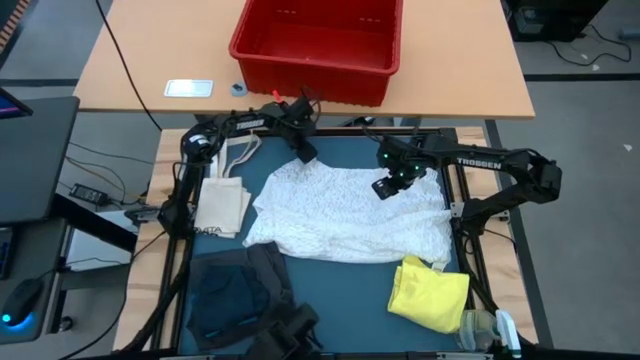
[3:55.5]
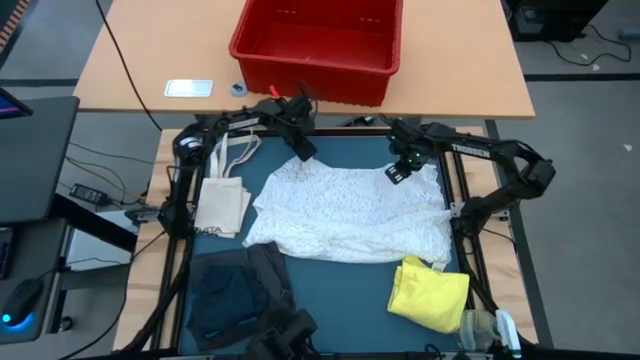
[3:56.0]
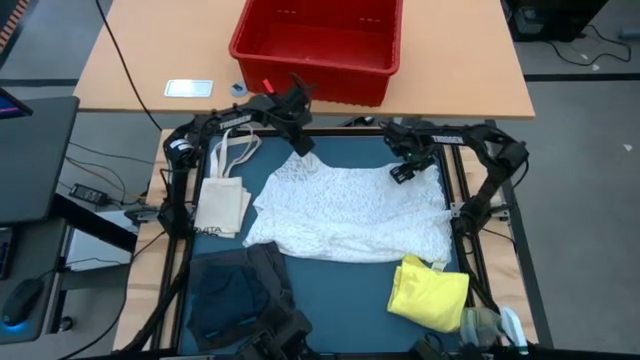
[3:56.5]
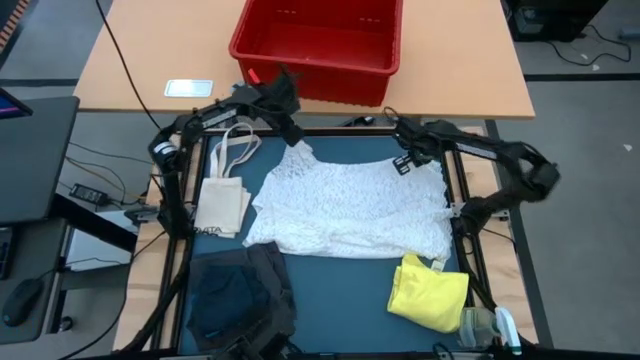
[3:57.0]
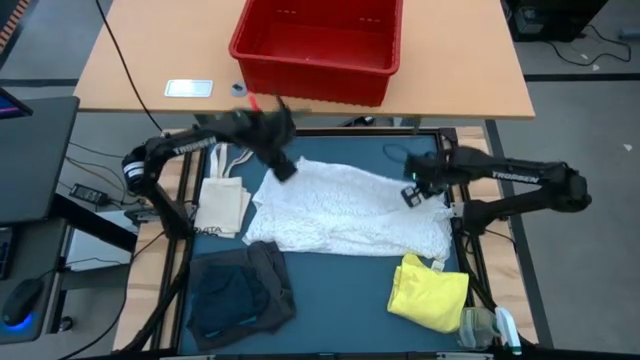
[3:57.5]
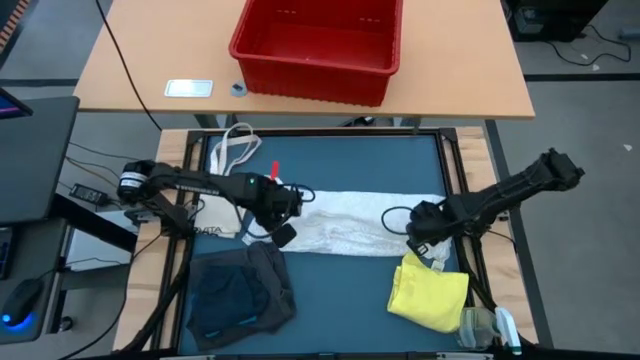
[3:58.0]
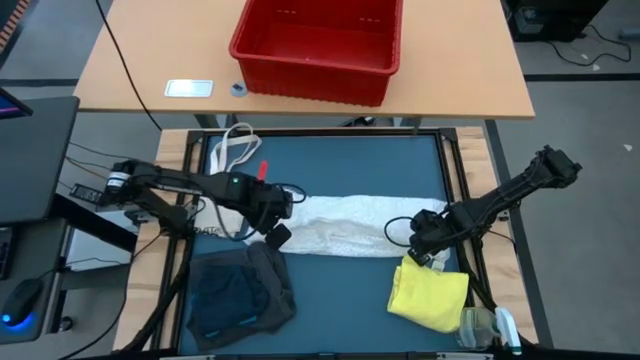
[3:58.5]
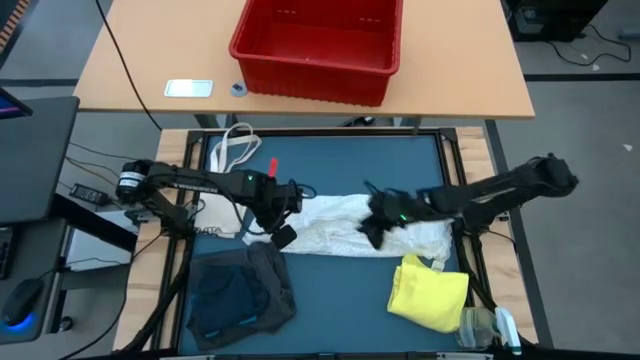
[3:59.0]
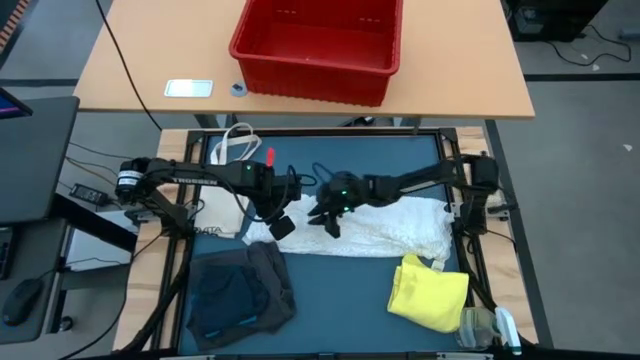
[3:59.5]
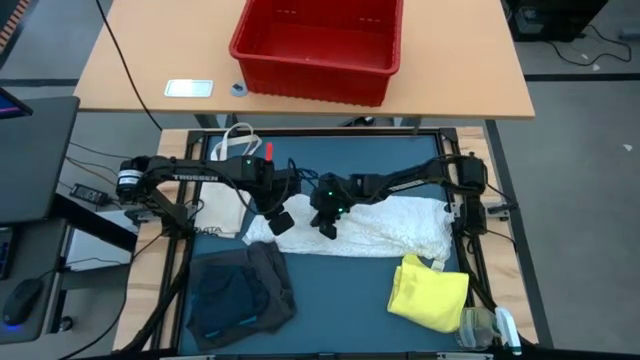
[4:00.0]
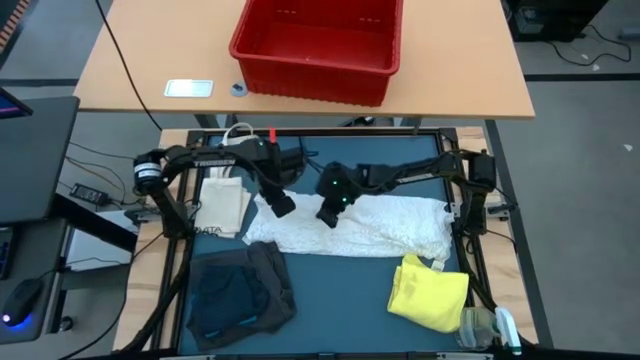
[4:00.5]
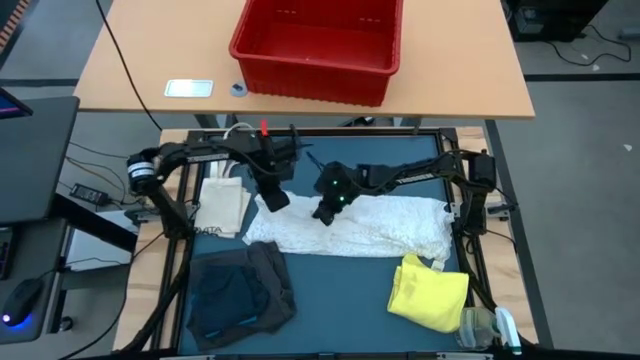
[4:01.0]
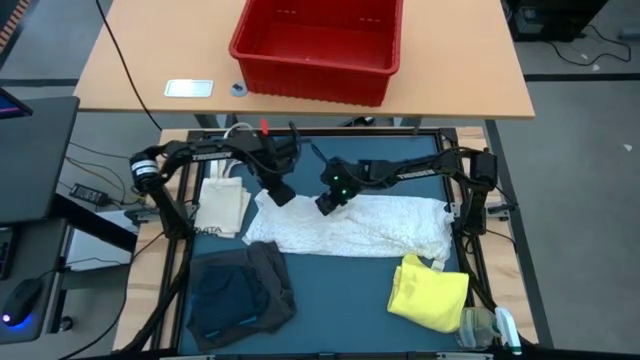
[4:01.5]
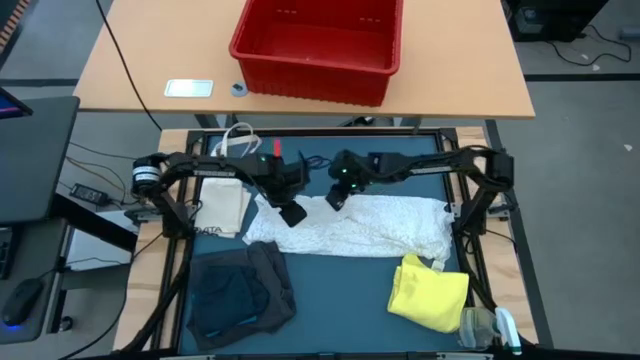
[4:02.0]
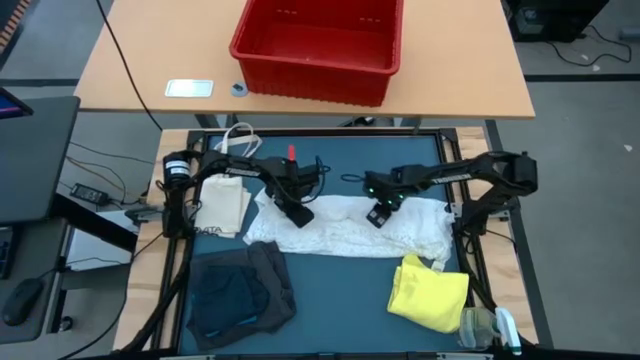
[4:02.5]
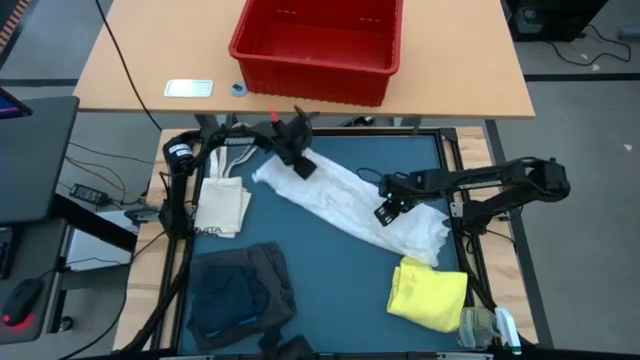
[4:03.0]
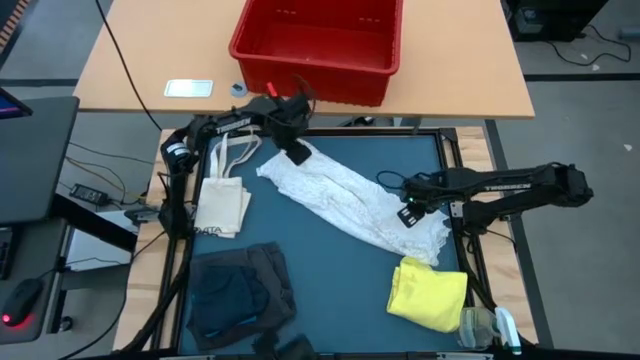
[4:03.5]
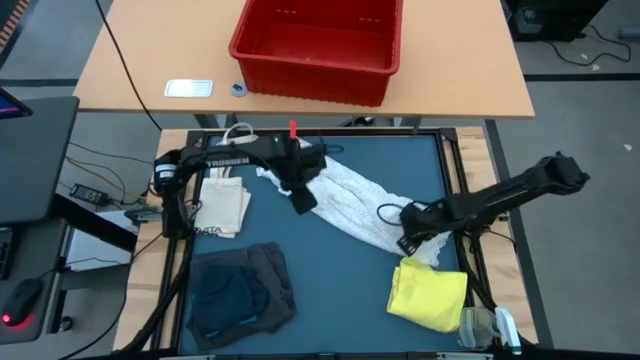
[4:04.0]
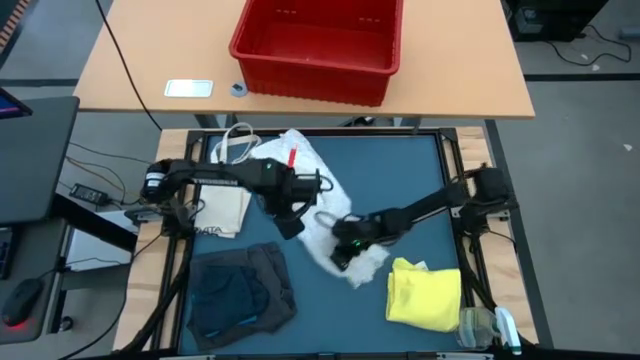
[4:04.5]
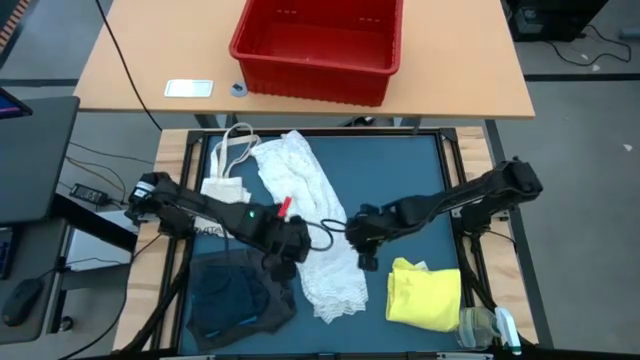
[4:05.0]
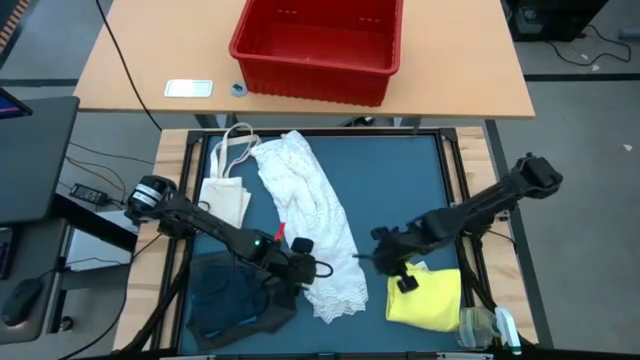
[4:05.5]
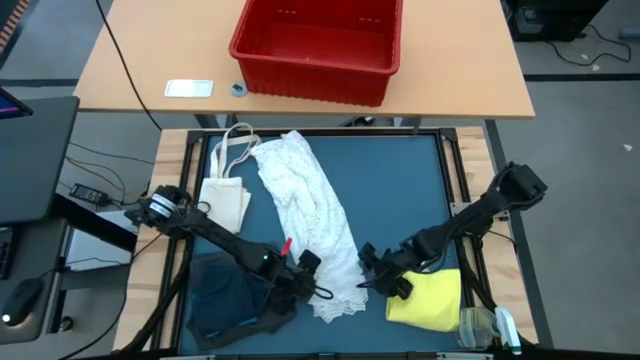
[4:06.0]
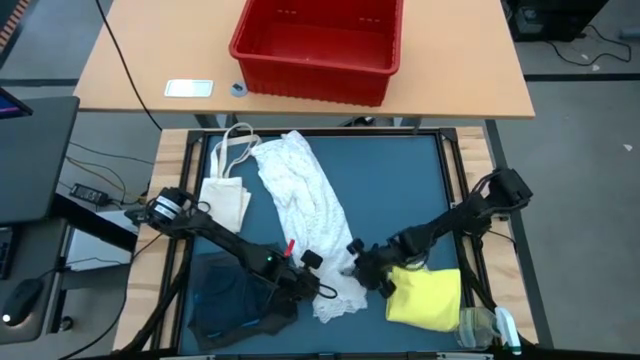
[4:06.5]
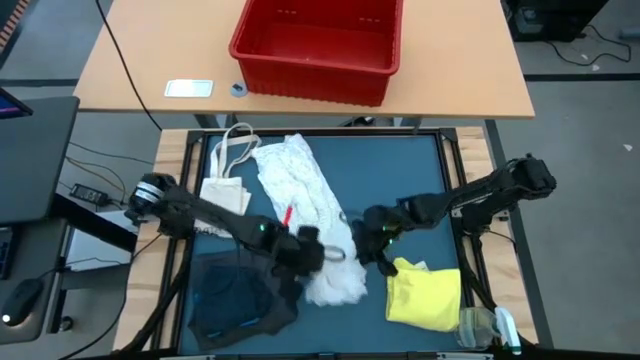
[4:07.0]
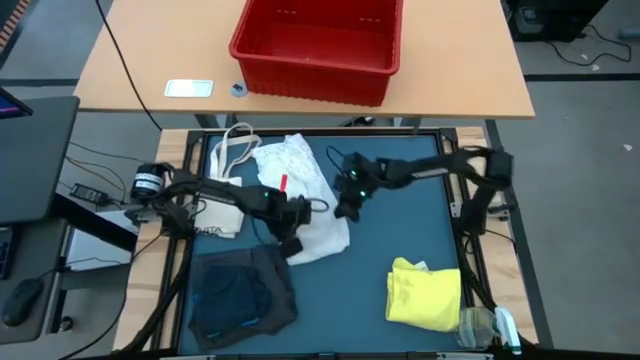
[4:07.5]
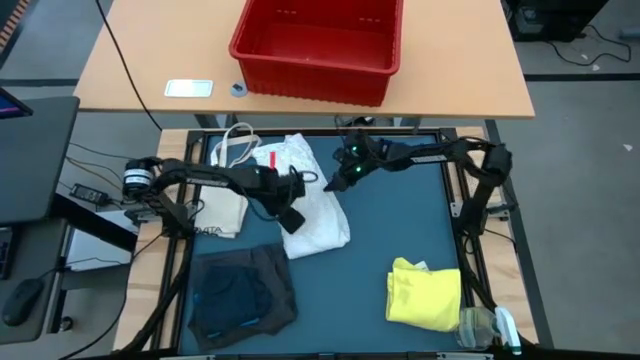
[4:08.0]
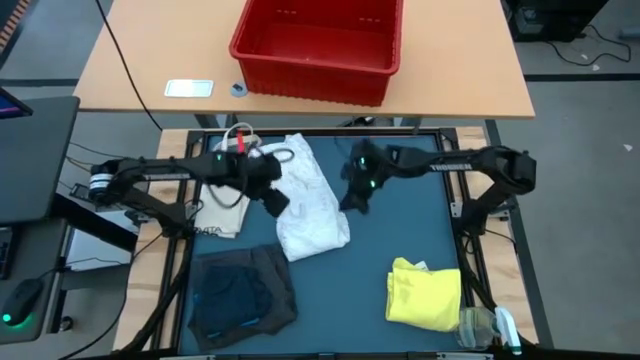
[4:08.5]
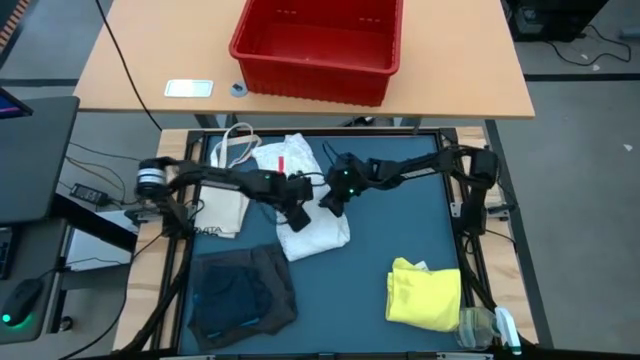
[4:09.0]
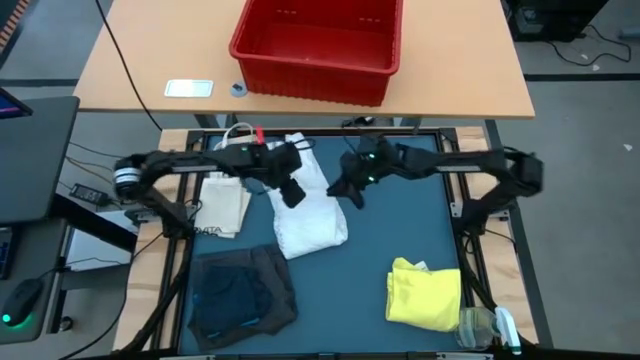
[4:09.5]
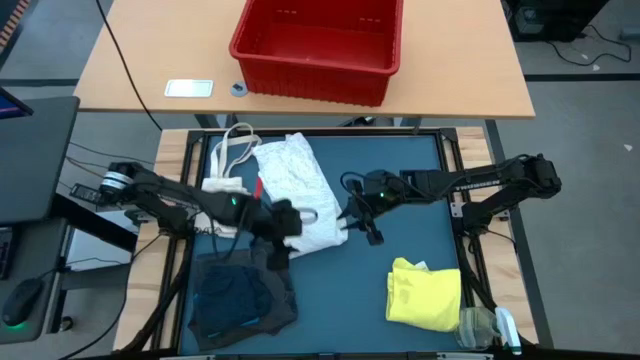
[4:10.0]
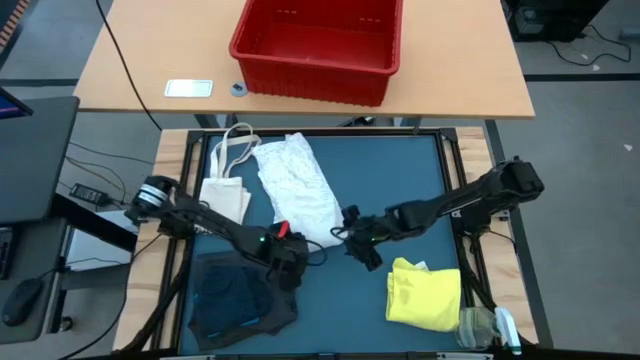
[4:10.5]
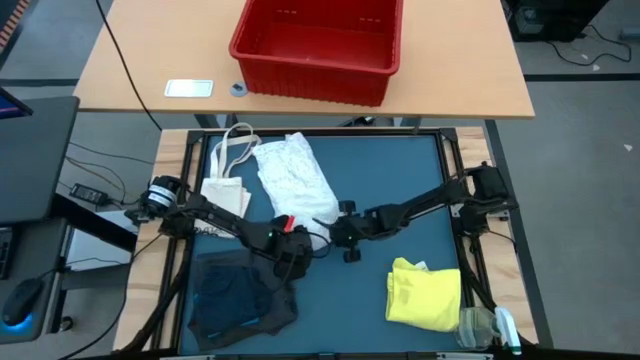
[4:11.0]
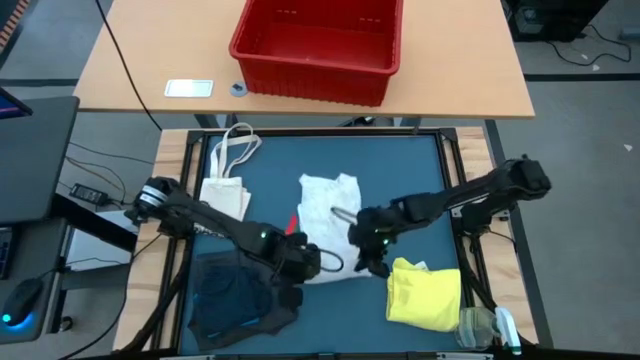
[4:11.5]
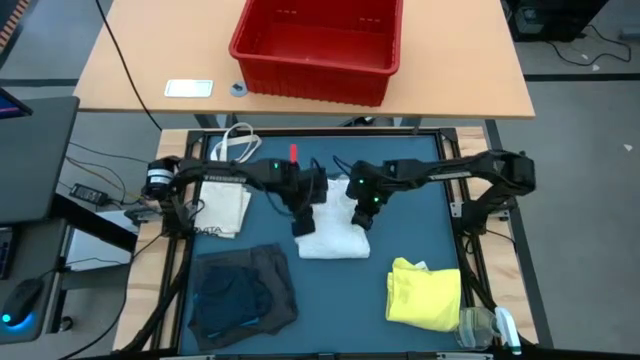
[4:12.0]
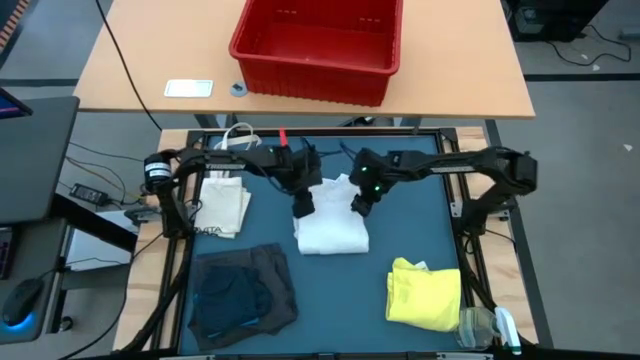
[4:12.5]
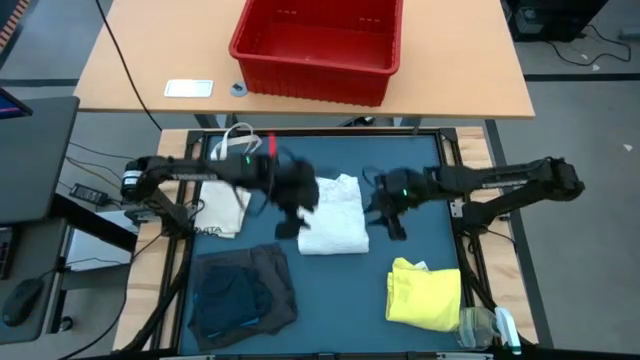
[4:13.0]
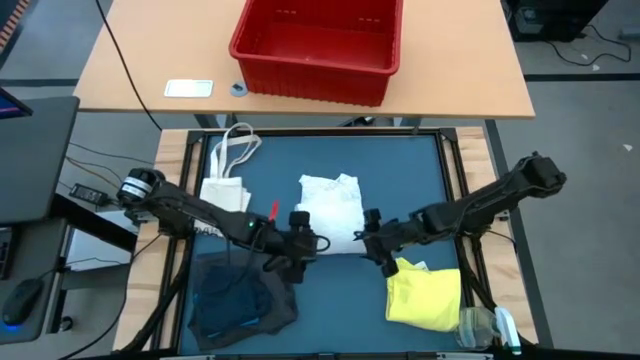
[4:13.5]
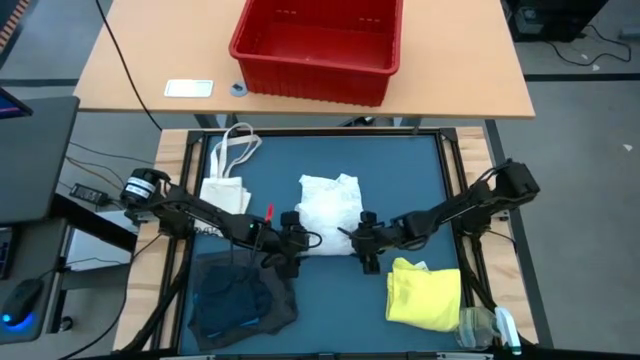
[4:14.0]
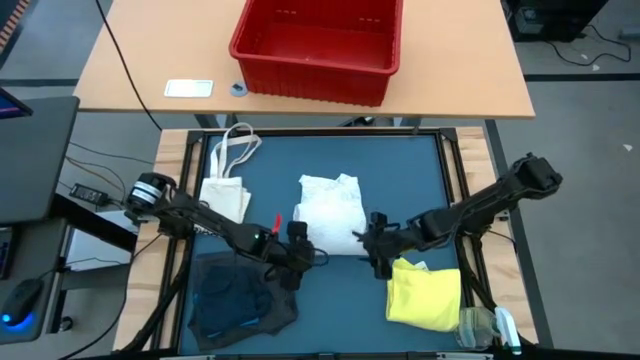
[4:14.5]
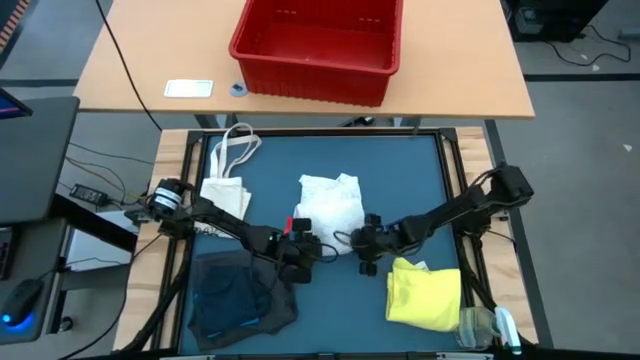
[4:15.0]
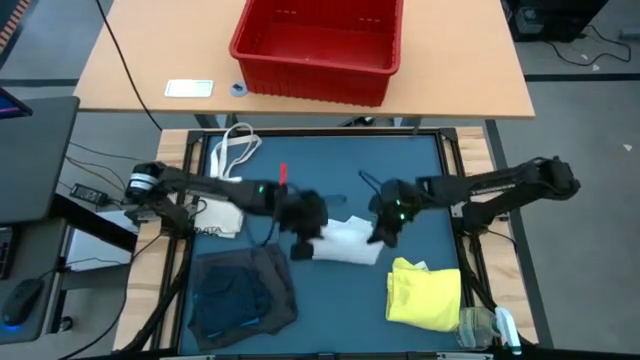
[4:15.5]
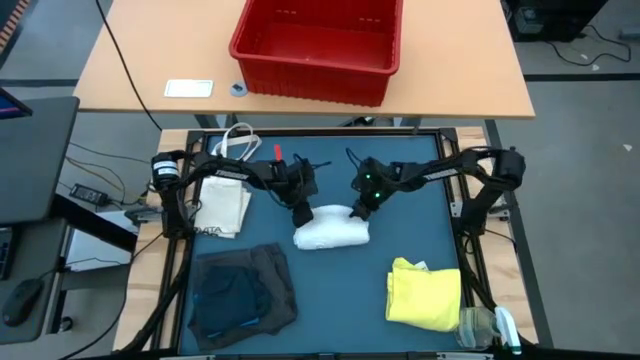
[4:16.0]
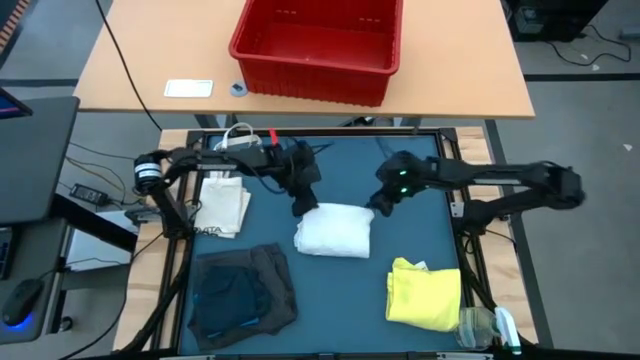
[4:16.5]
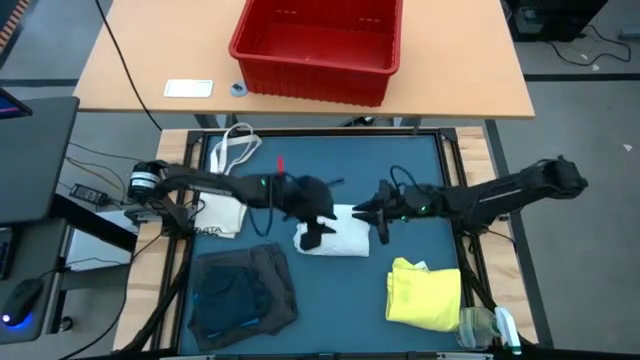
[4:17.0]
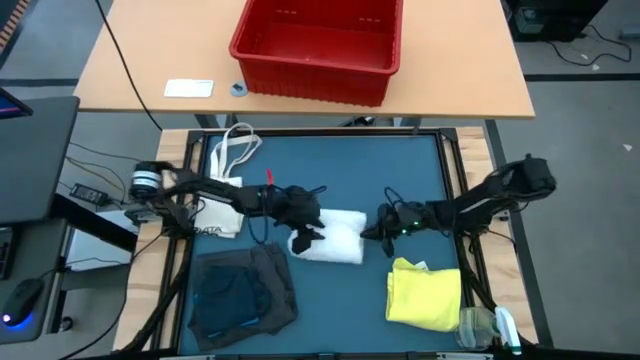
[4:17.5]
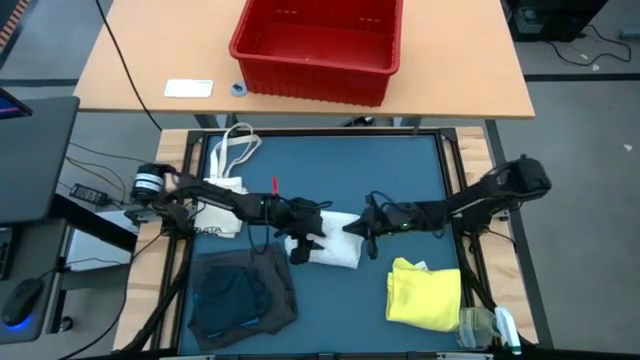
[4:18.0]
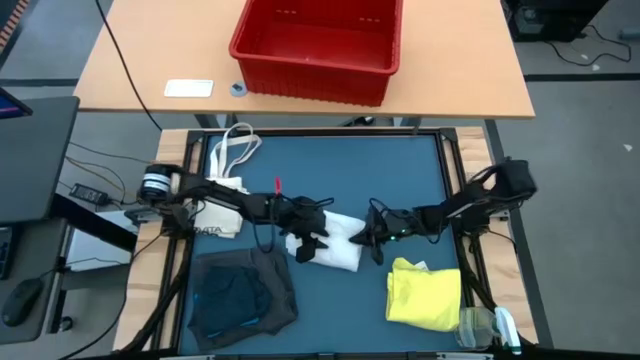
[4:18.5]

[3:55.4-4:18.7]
Task: Fold laundry
Fold the white shirt
